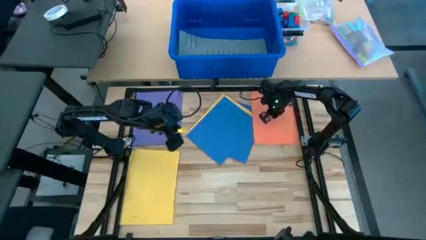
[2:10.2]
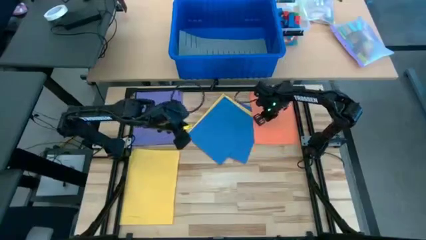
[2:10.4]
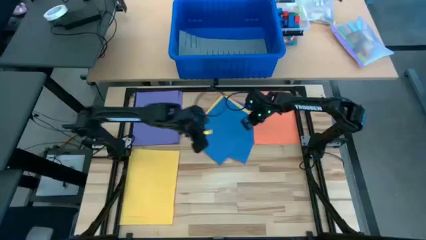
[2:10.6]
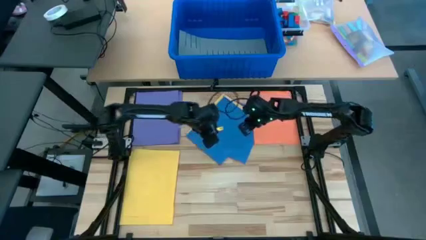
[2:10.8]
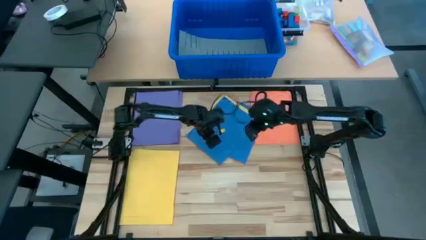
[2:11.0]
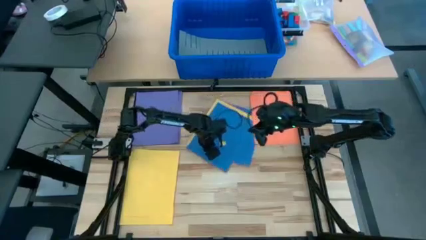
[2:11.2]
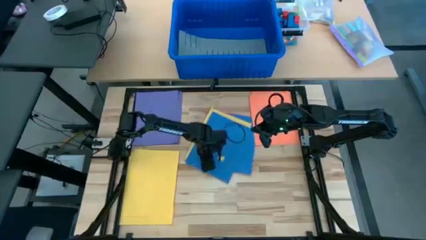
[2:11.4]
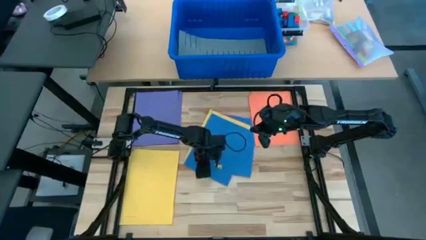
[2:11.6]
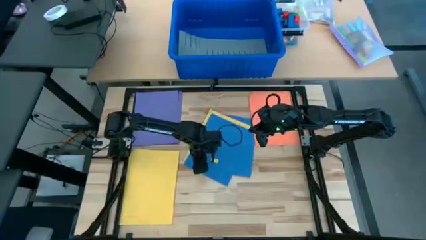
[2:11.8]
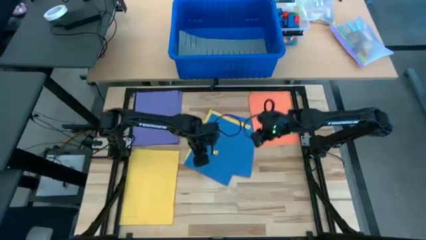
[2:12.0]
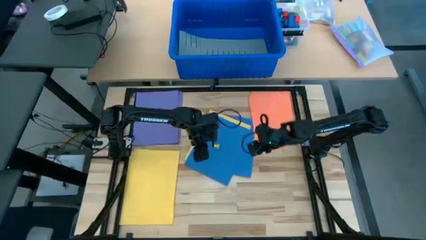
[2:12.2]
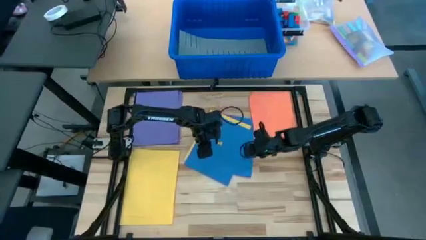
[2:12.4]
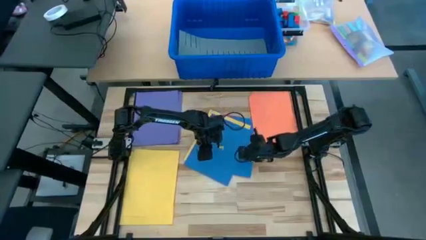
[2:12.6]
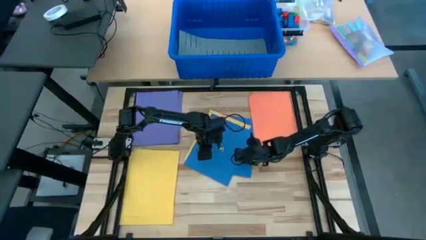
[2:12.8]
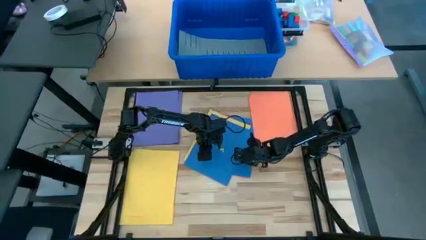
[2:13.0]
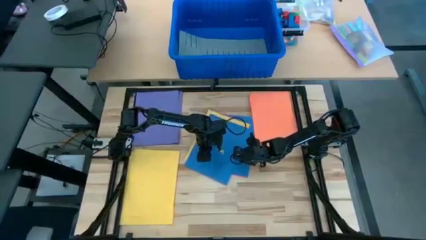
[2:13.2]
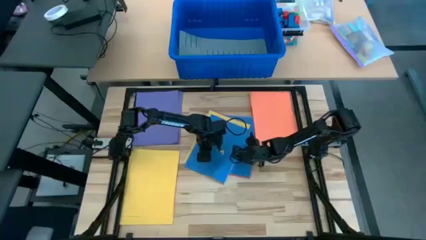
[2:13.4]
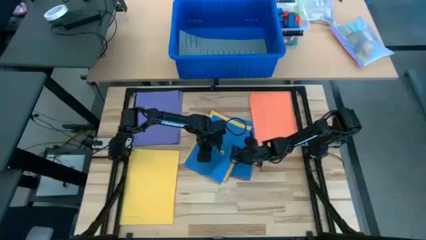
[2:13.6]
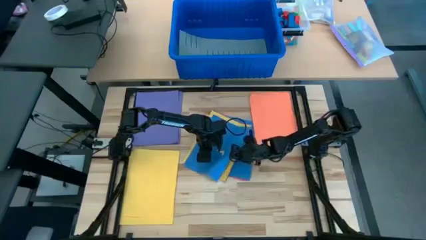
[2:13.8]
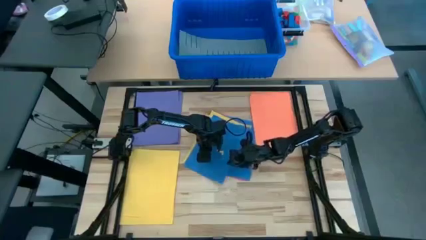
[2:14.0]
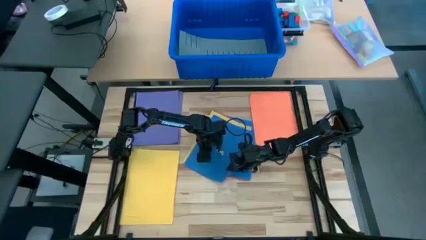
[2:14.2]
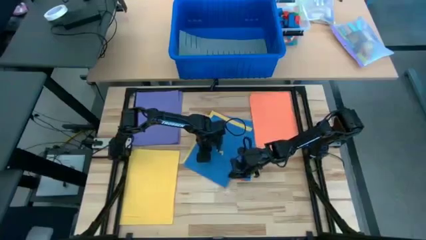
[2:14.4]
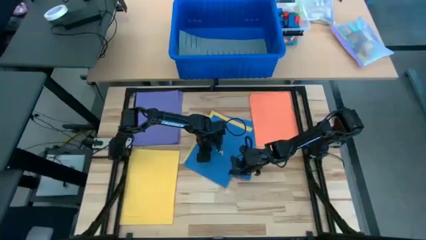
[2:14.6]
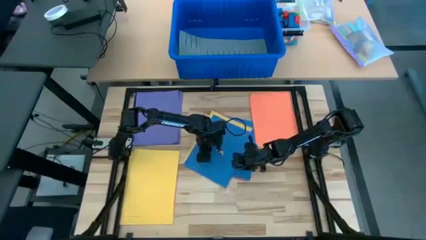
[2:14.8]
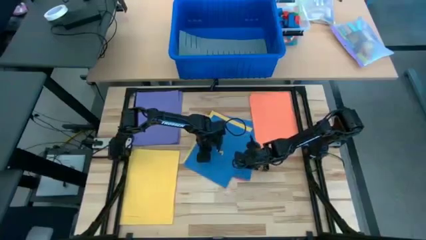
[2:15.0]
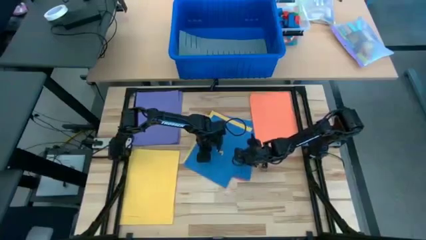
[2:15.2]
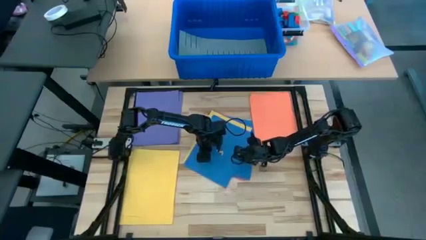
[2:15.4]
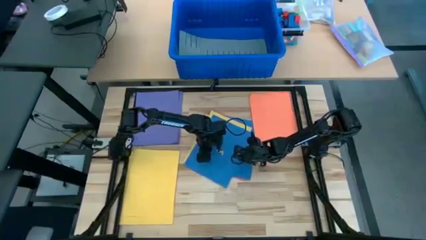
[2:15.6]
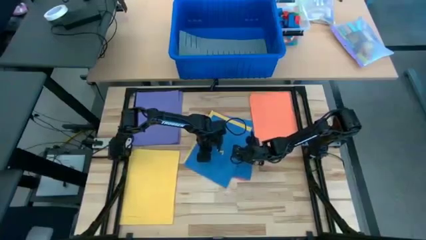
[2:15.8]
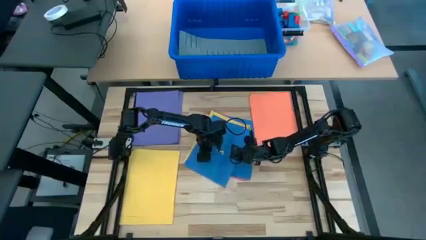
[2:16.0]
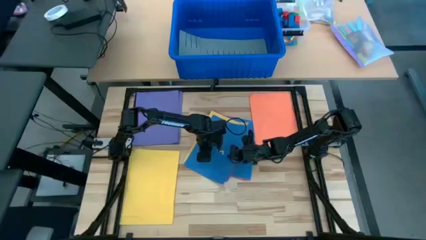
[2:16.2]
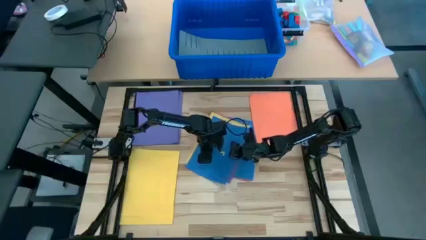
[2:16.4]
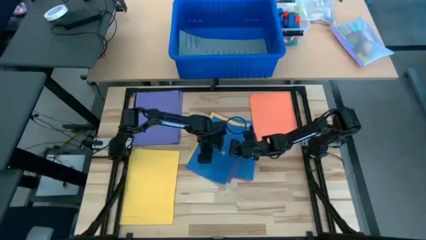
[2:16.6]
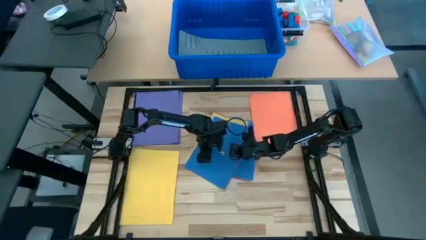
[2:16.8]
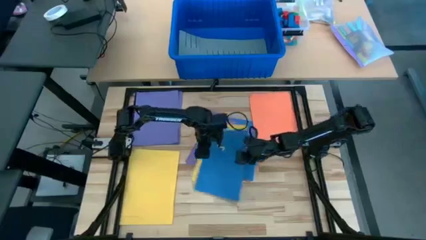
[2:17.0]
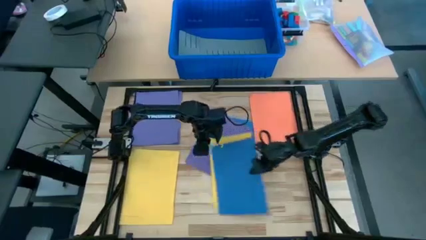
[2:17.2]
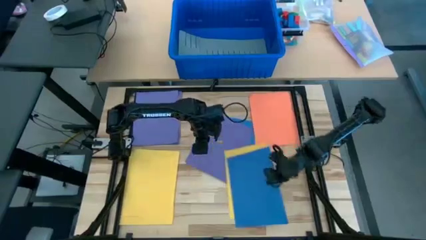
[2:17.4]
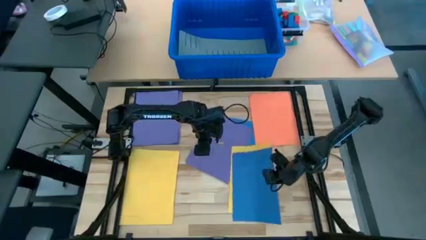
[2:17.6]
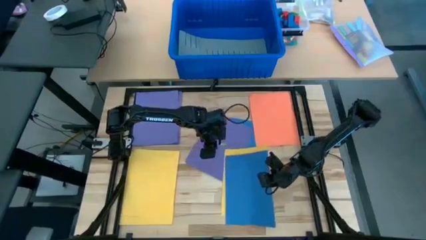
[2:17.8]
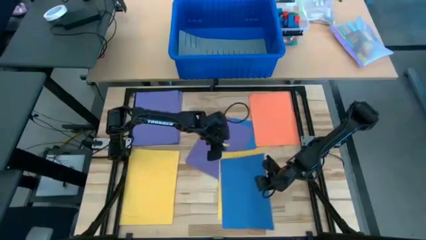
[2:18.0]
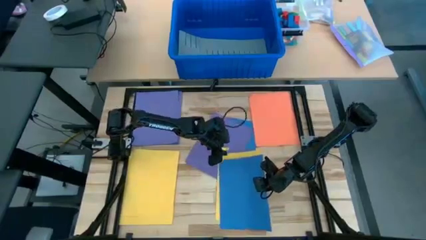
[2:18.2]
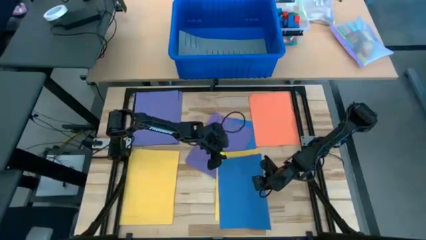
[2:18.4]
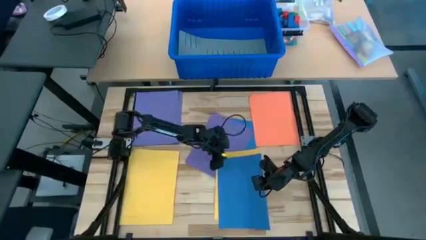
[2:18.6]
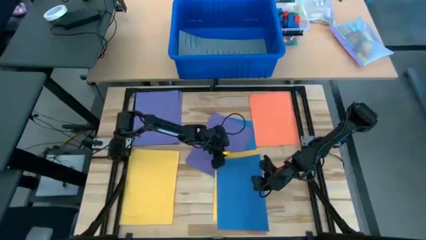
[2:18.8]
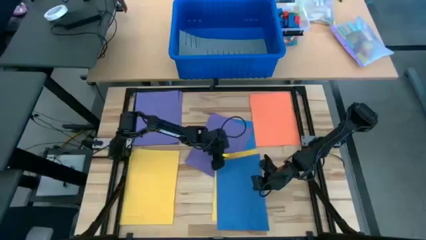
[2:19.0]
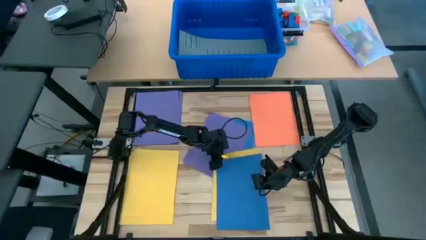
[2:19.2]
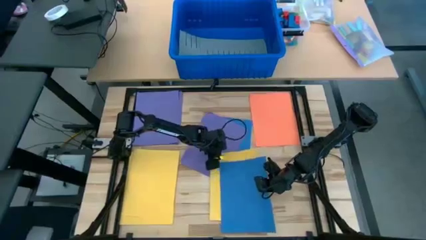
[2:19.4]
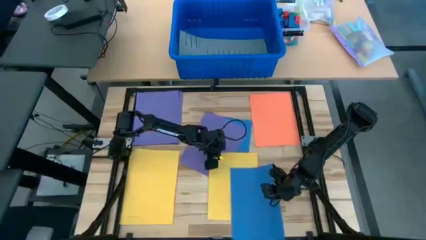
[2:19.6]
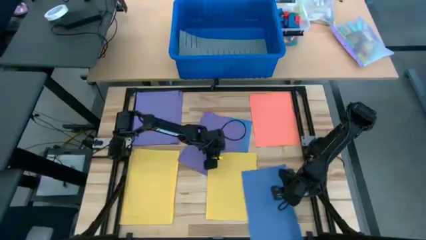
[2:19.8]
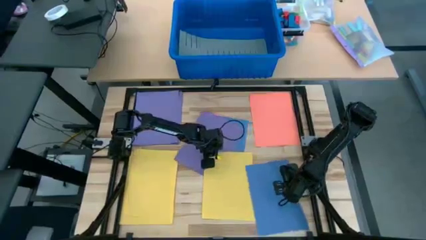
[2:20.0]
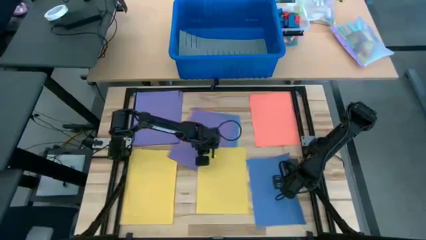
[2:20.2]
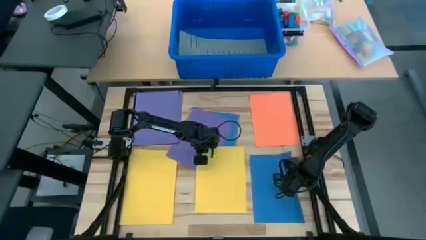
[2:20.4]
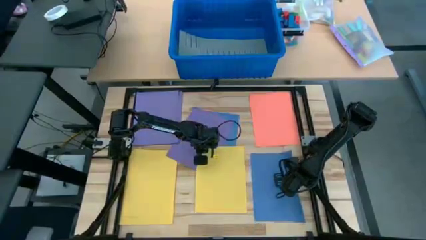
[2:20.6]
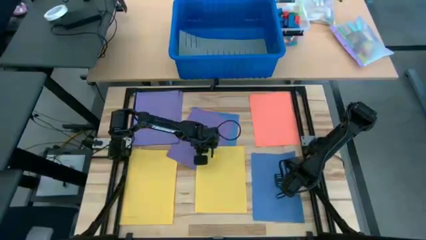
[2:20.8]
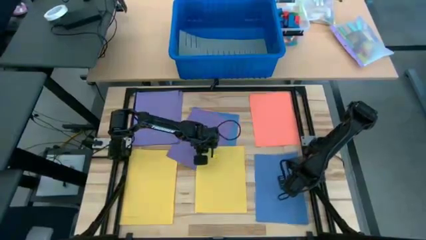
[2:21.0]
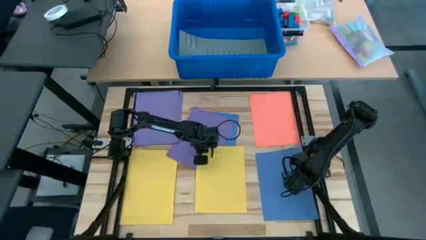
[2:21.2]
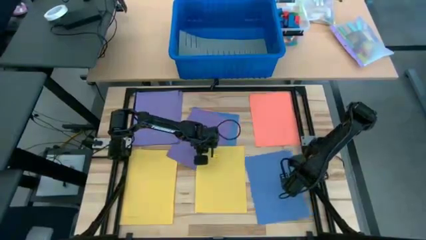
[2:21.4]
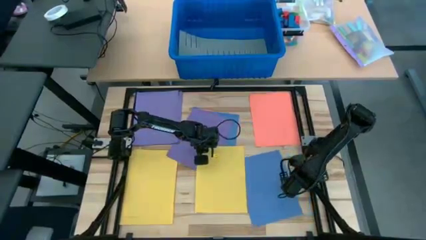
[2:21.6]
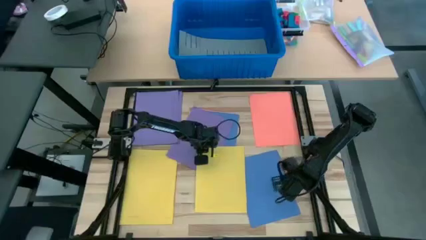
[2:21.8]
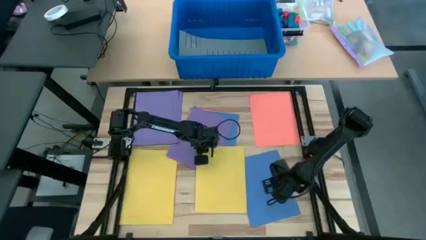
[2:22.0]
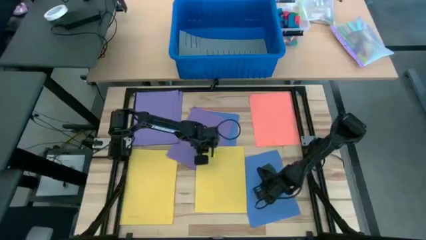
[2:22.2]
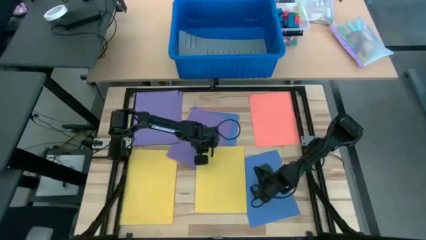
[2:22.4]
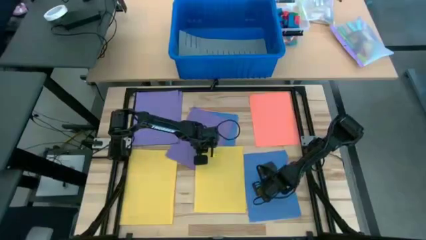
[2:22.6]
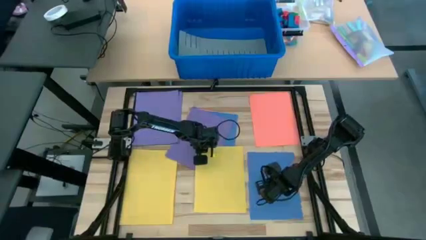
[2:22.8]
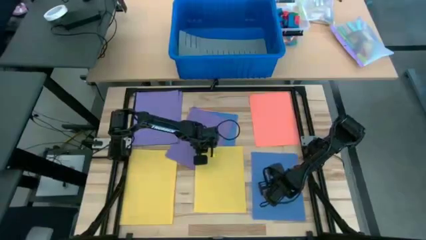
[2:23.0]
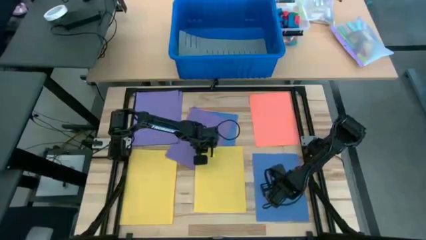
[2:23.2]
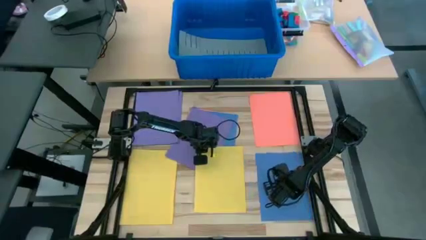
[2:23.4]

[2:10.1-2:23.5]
Task: Organize paper
Prepare the blue colored paper

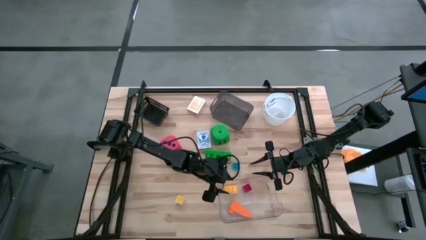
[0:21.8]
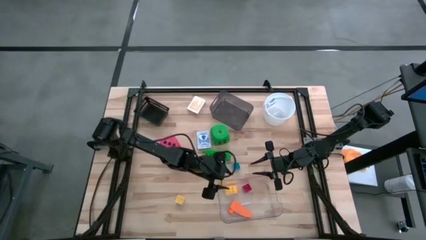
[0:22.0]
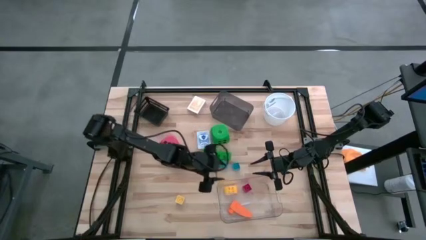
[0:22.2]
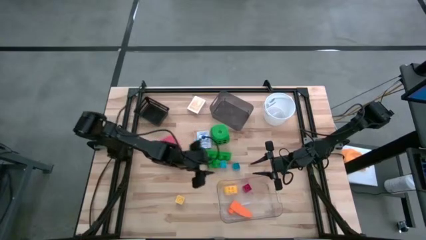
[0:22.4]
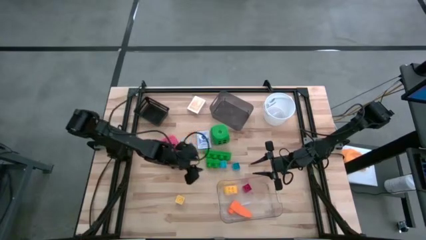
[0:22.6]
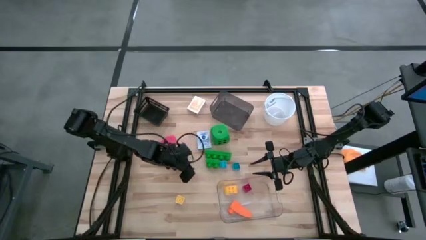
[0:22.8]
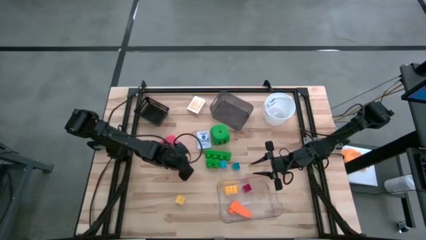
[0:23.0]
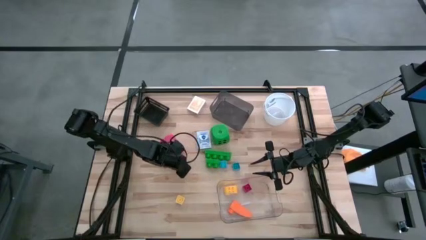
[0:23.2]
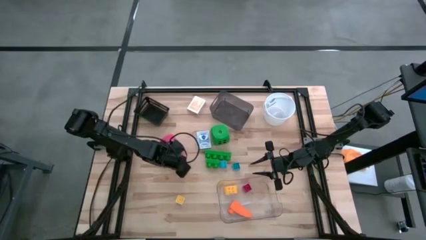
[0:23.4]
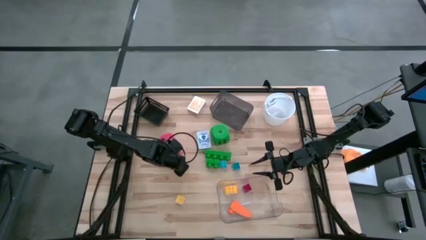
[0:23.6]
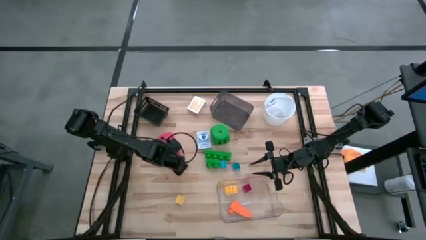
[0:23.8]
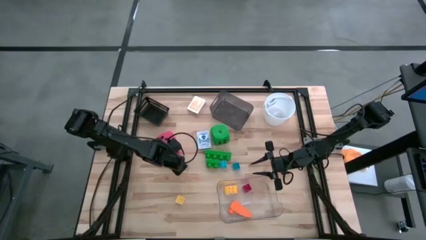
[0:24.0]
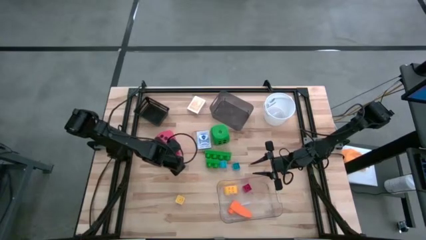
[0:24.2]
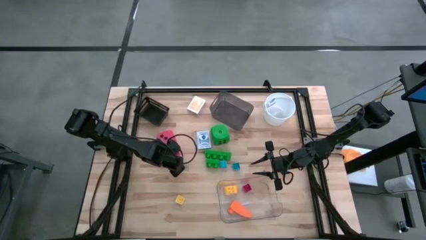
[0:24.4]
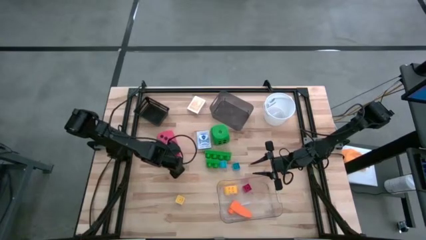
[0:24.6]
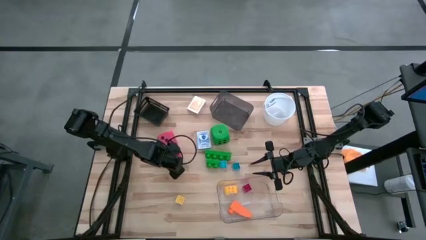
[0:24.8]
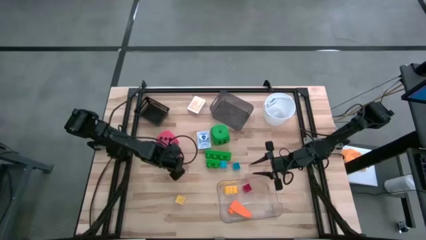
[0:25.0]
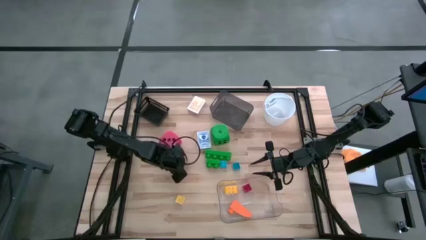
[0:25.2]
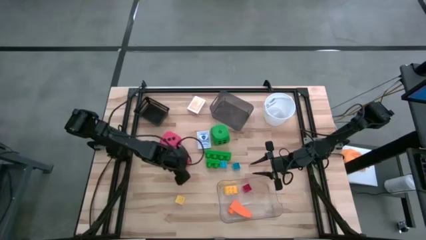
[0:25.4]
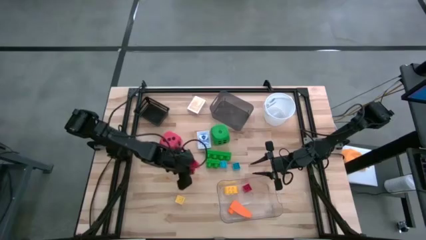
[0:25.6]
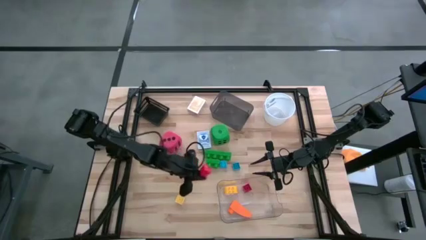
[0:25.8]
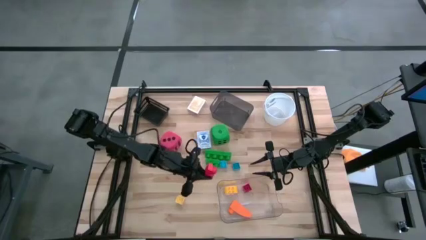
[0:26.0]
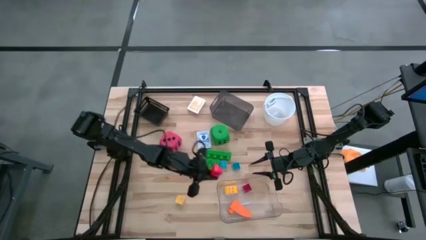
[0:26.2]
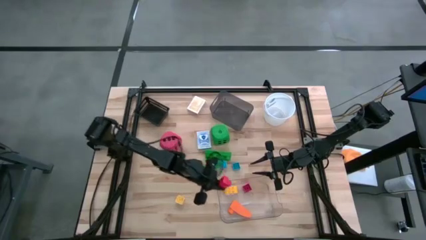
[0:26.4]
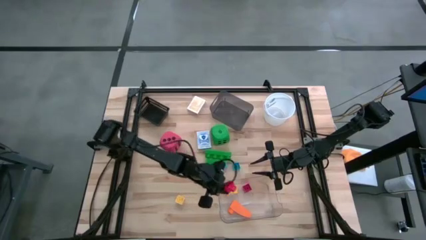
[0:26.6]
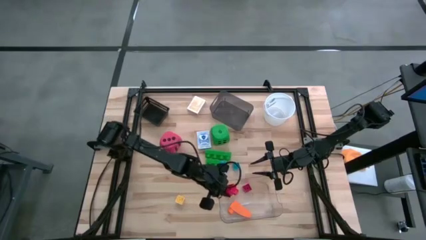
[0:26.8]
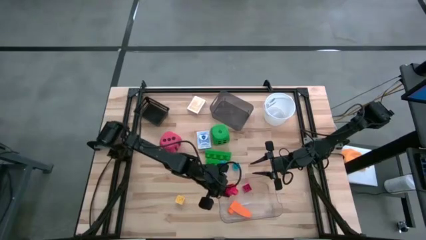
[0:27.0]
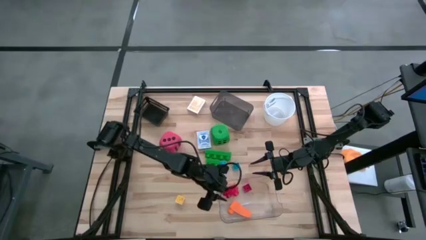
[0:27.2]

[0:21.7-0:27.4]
Task: Pick & Place Toys
Put the red game piece into the transparent bin
